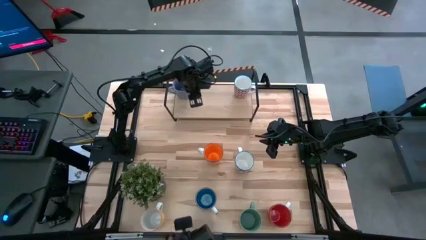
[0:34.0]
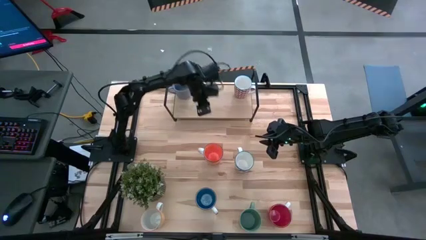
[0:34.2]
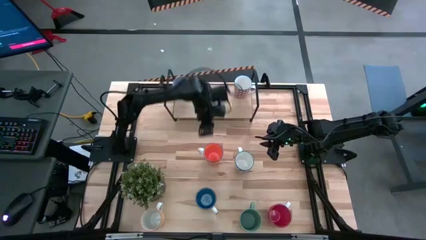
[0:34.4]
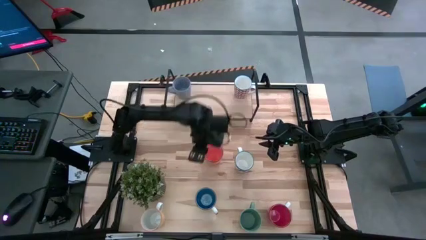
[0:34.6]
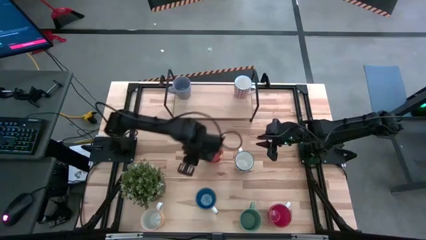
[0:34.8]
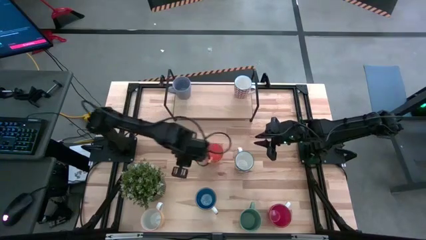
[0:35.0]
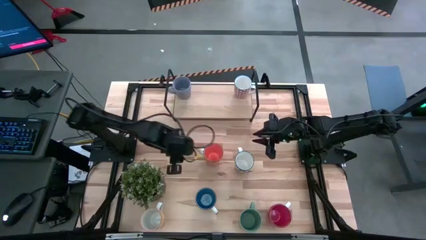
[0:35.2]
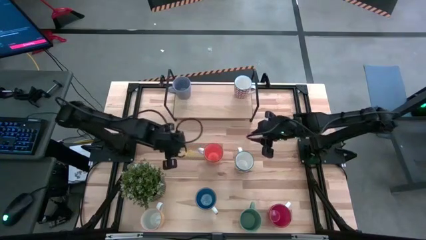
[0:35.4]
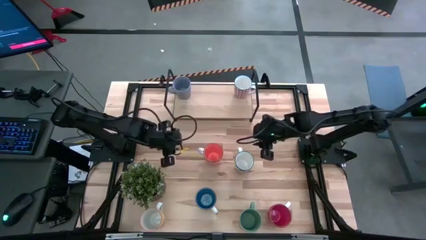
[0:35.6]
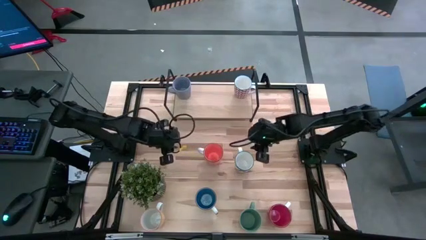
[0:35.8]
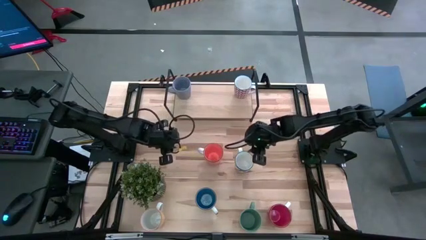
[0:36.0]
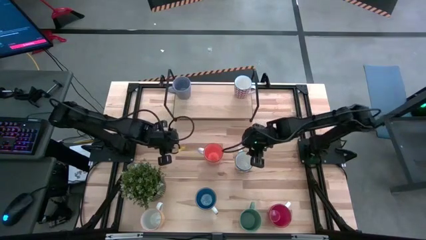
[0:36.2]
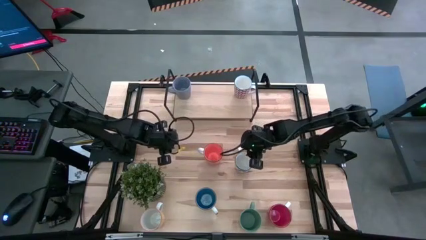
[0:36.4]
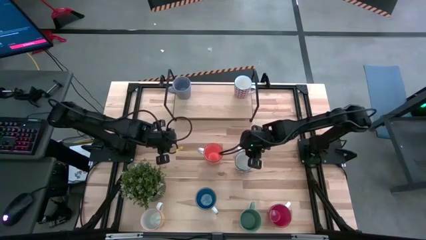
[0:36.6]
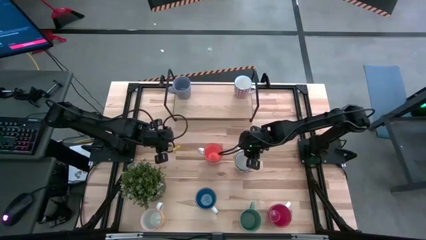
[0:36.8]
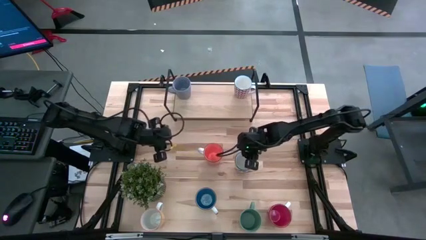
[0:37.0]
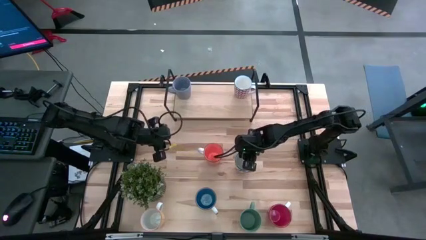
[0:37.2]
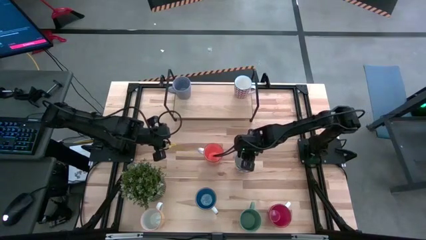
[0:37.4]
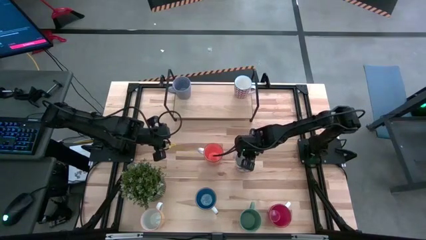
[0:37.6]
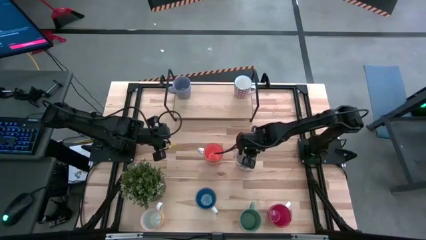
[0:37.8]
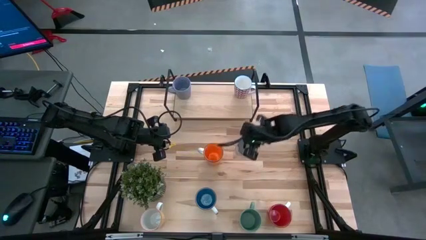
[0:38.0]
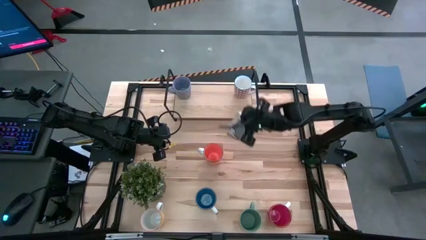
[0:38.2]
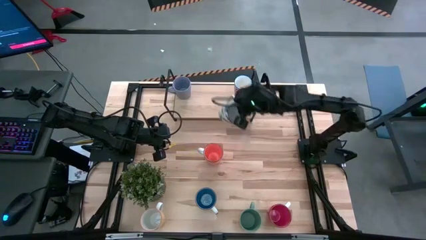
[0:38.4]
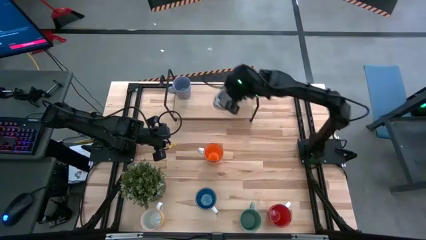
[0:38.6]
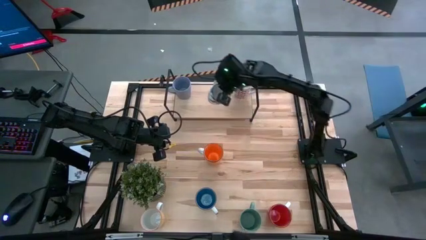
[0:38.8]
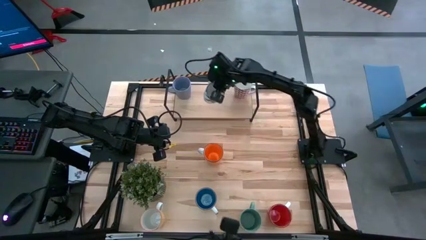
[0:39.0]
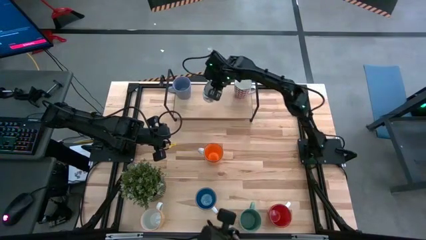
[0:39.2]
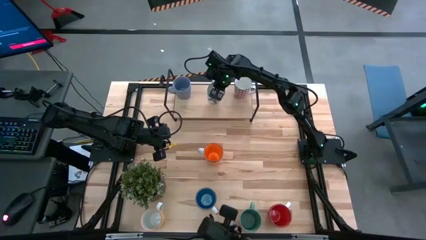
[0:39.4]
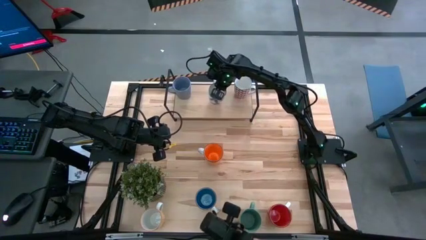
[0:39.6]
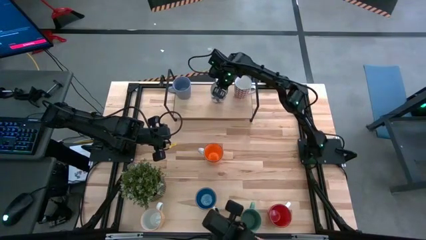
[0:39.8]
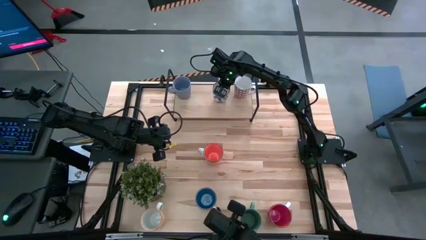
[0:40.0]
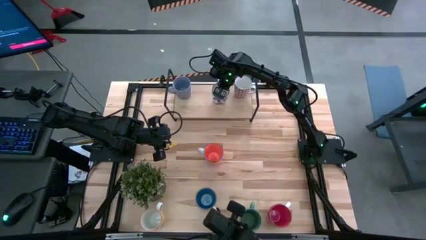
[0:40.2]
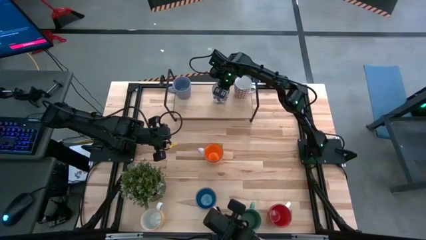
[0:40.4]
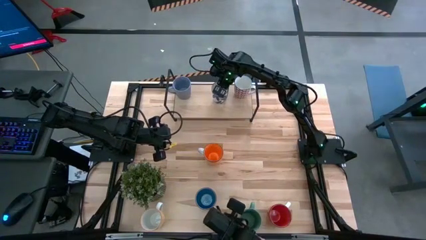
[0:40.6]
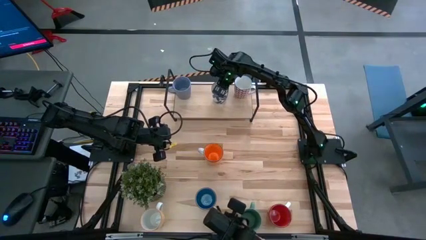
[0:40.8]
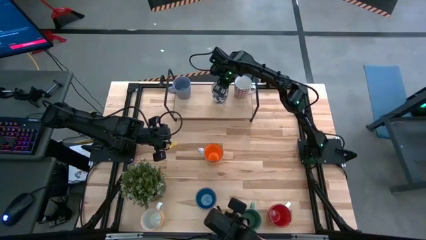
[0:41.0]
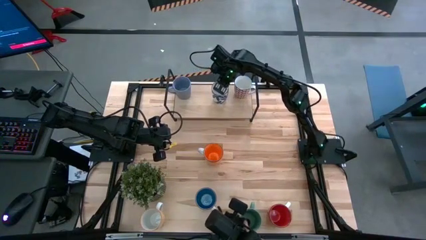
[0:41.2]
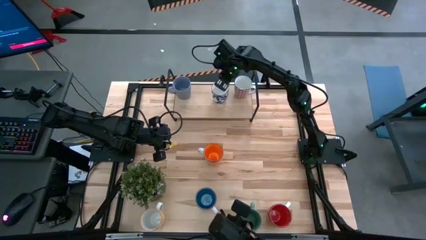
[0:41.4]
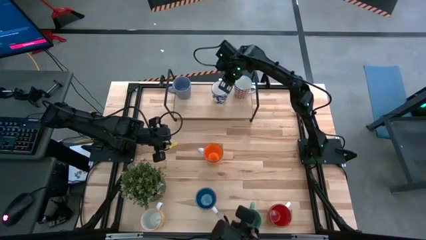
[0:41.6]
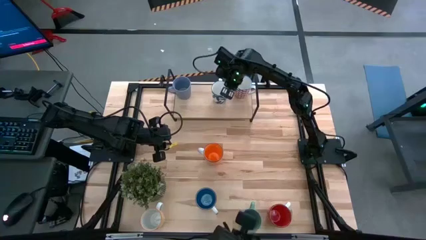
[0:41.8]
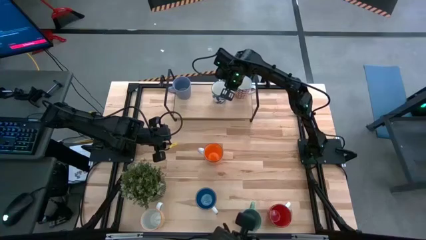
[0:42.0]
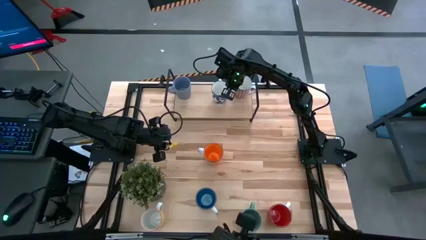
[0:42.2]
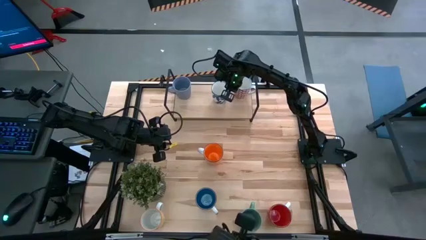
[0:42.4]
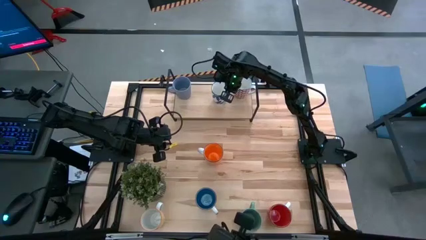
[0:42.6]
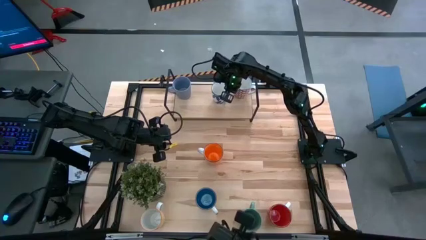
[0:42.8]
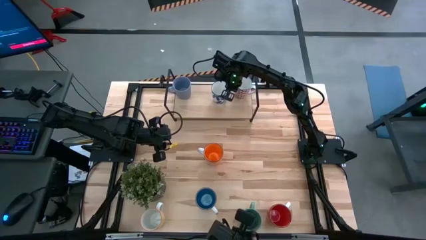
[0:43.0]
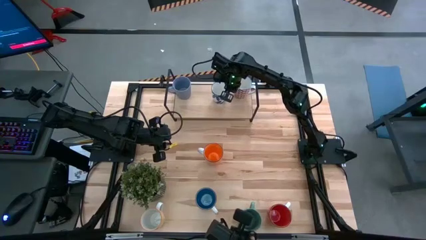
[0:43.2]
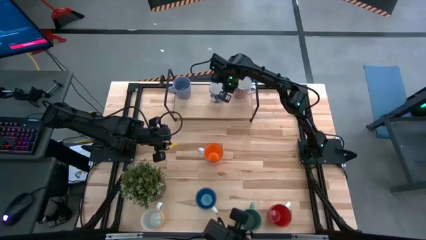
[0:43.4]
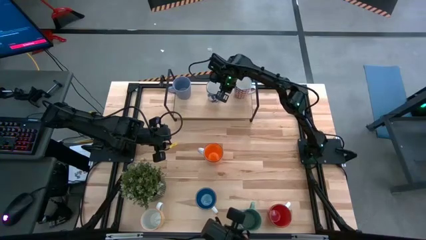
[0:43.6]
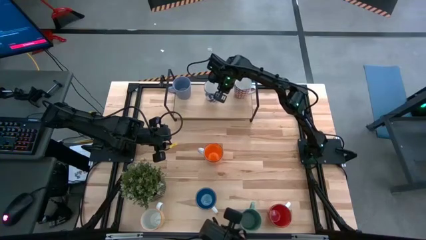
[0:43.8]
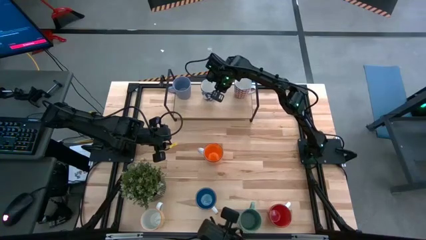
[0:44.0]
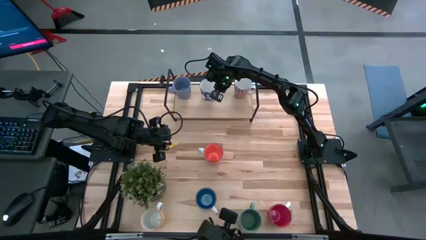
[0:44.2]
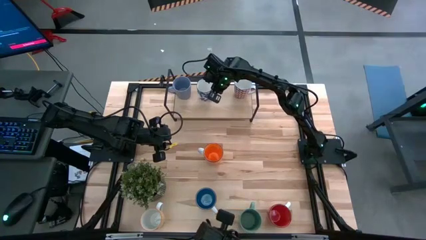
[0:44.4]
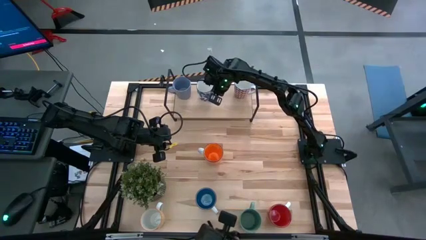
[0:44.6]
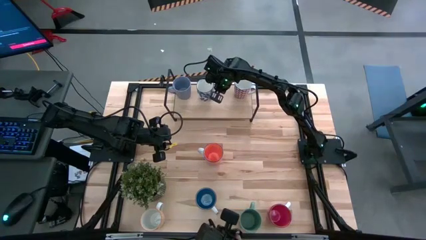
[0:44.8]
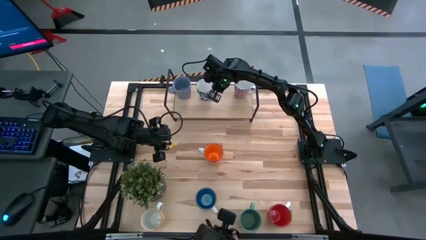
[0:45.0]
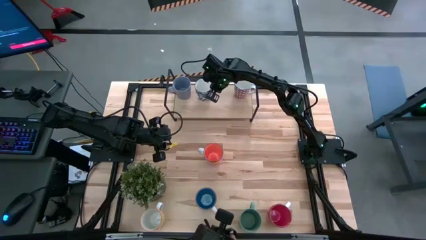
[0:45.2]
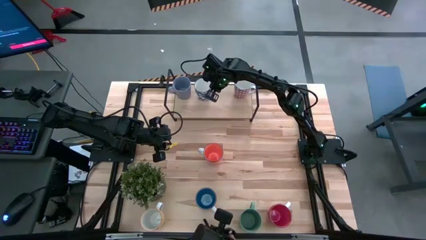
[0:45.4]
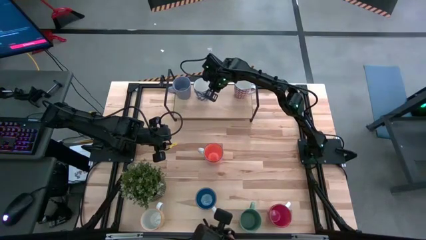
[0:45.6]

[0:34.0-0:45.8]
Task: Place coffee mugs
Put the blue white floral mug on the shelf

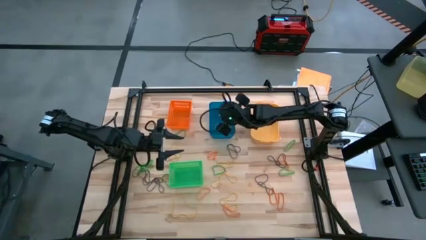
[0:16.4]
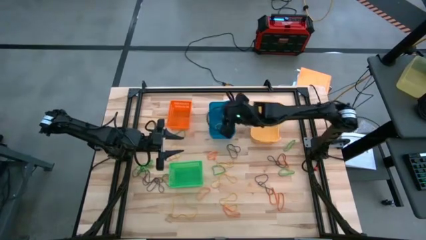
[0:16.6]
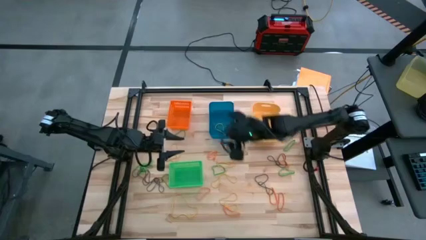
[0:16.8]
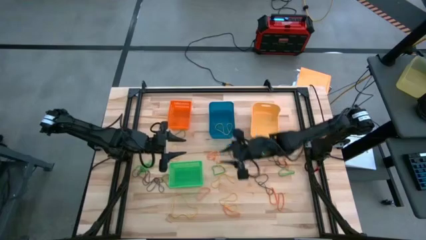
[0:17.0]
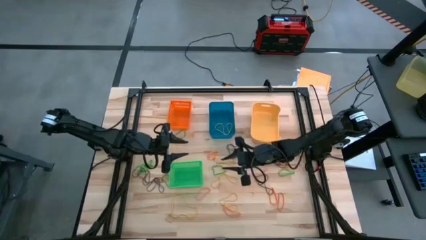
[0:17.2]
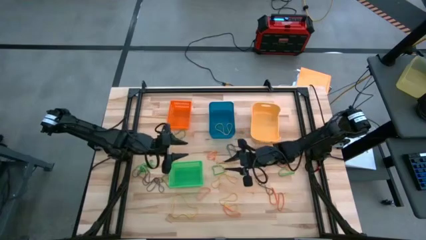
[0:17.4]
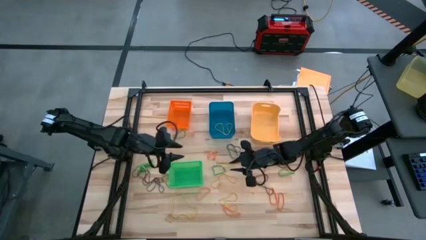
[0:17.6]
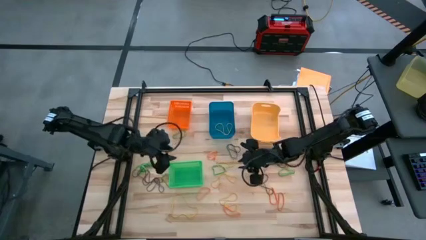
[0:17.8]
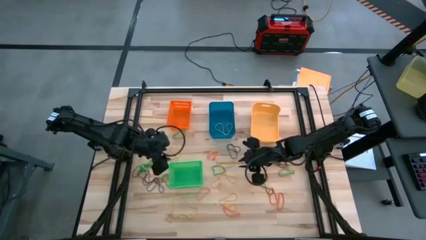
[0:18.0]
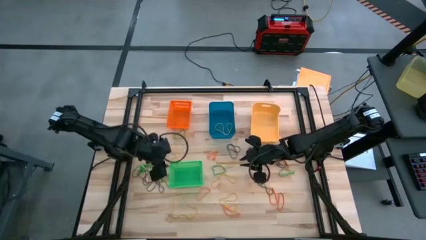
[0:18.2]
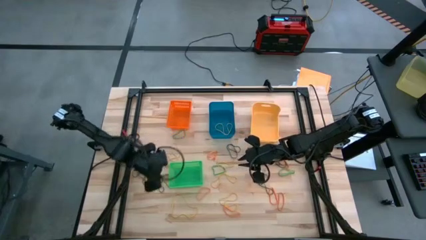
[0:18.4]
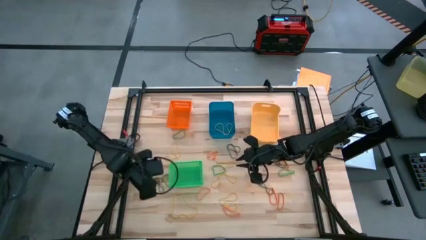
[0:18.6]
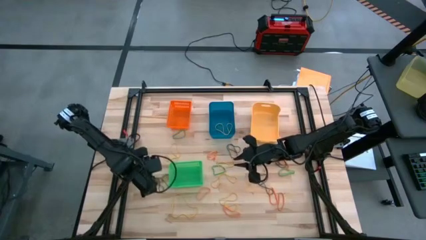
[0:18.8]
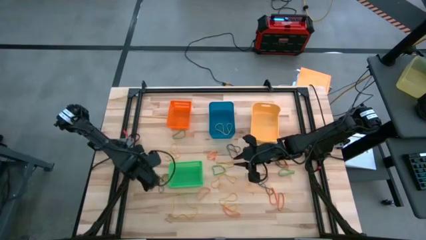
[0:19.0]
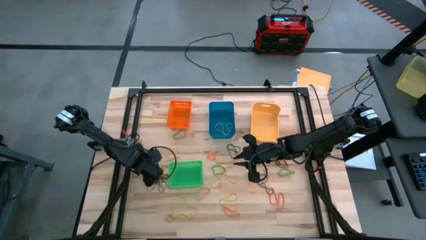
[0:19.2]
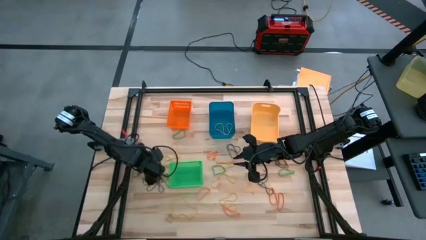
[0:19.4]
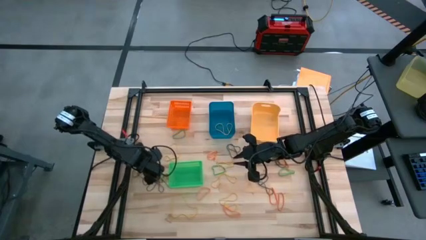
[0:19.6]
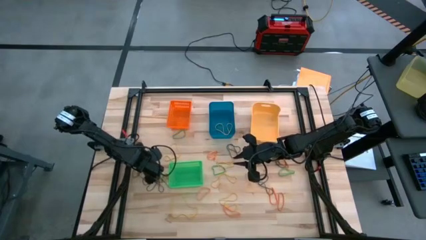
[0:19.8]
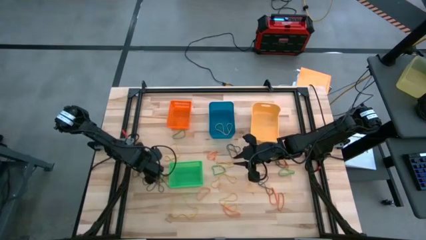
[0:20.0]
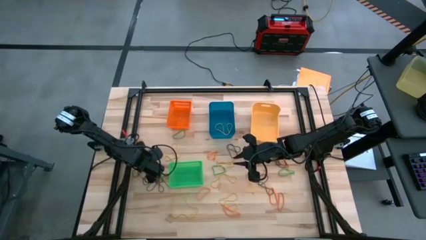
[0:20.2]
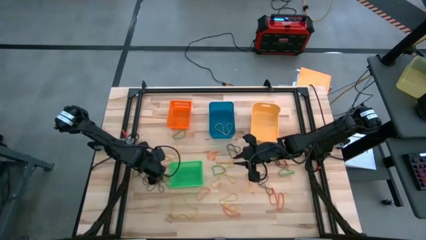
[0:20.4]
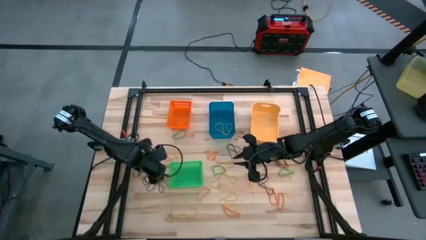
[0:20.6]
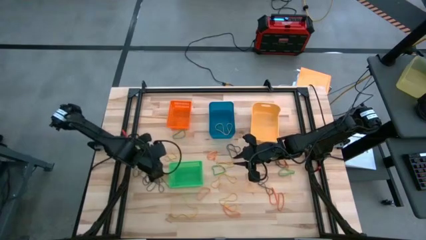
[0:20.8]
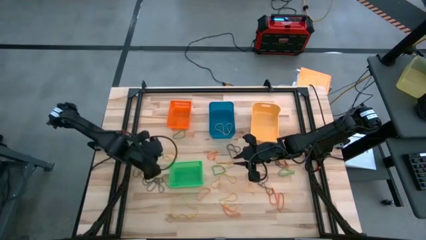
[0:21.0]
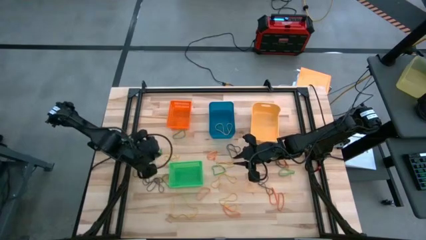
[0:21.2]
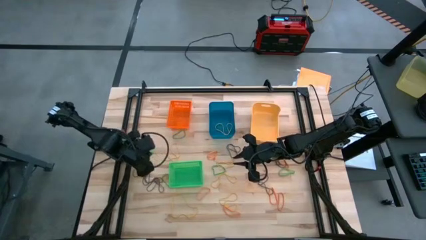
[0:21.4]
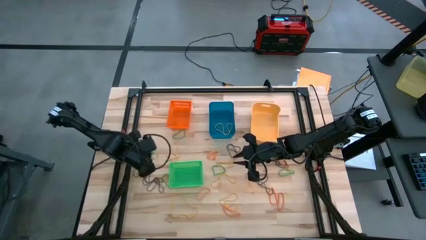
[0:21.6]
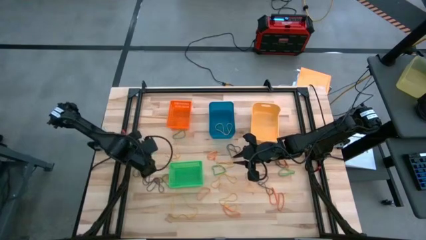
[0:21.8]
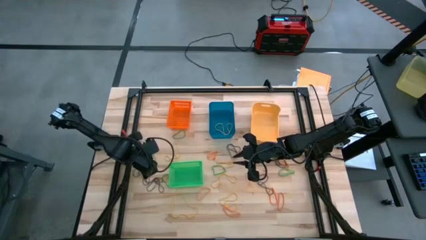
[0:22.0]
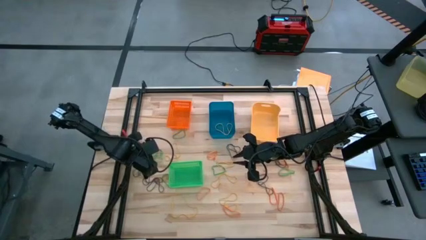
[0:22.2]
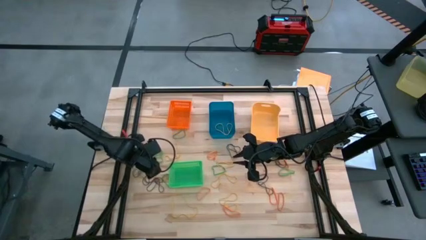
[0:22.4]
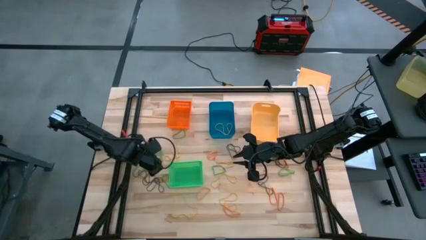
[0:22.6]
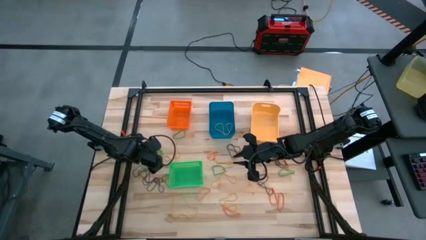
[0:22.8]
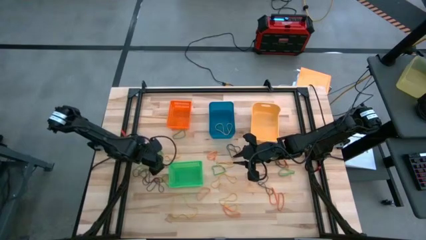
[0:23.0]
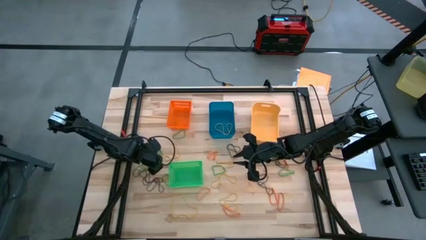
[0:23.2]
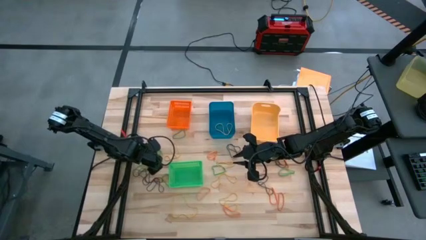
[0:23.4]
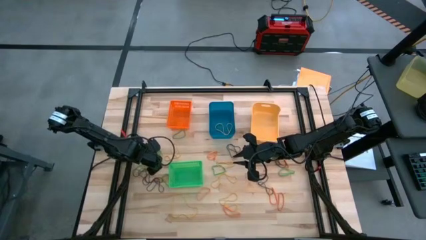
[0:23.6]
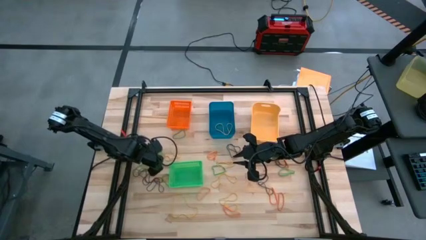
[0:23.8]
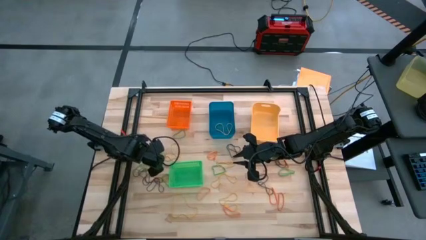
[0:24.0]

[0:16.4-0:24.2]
Task: Sort rubber bands into baskets
Put the green rubberband into the yellow bin
